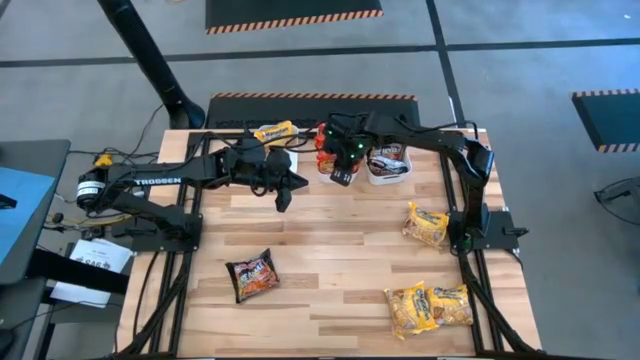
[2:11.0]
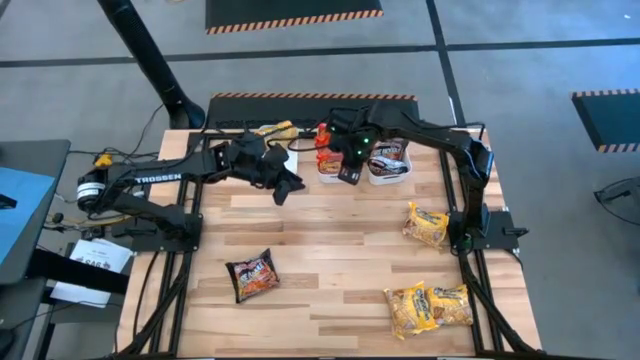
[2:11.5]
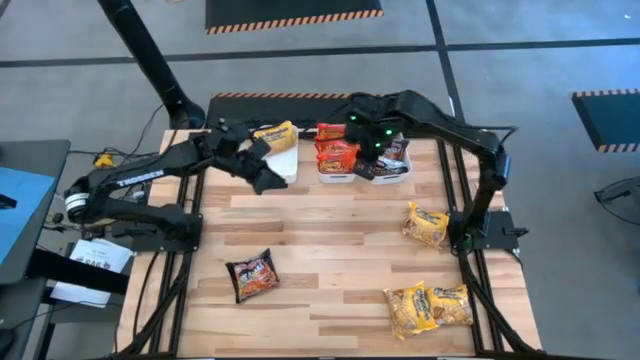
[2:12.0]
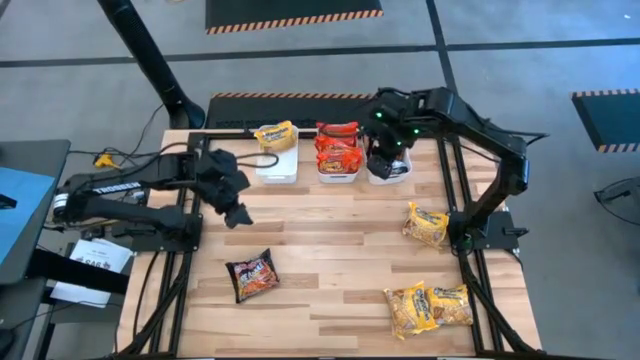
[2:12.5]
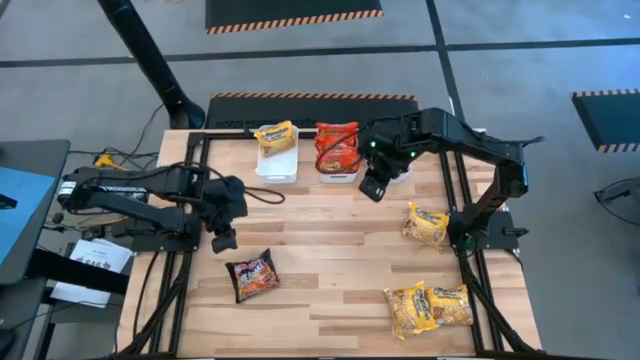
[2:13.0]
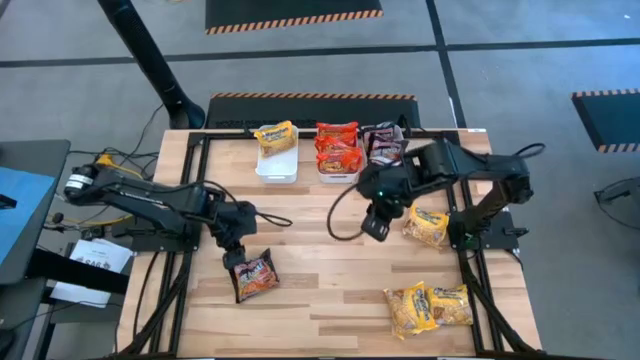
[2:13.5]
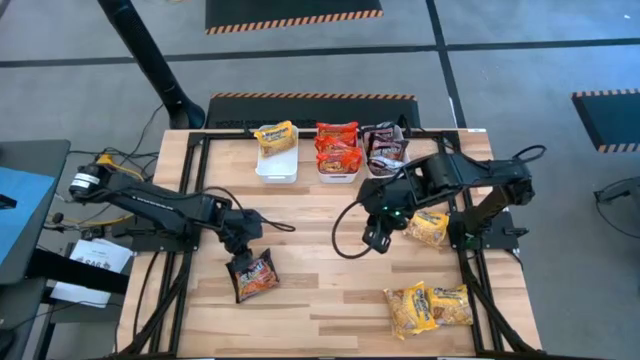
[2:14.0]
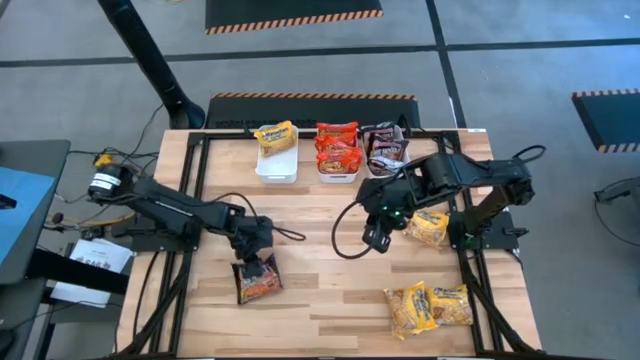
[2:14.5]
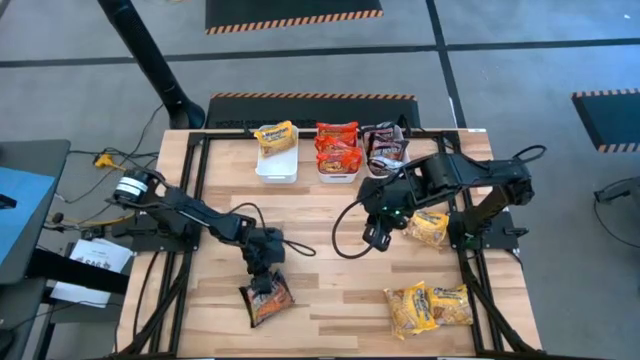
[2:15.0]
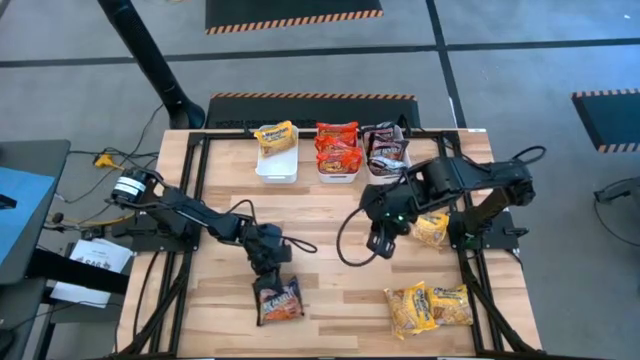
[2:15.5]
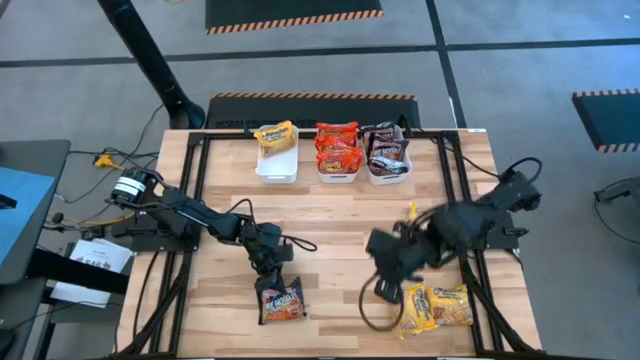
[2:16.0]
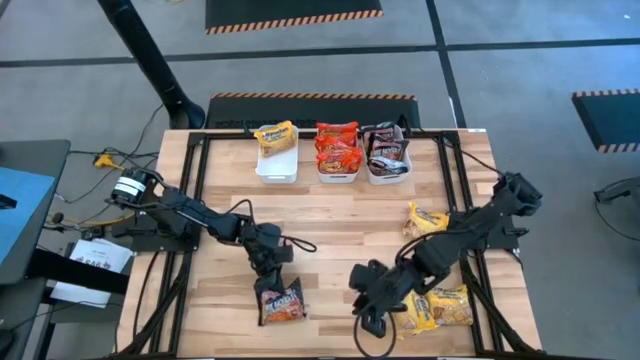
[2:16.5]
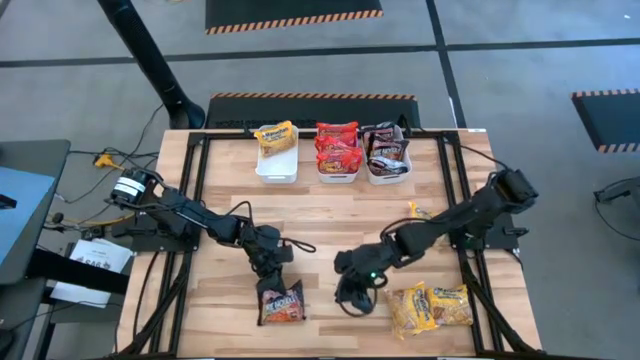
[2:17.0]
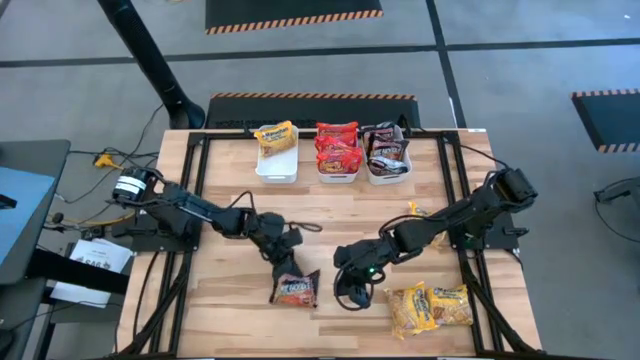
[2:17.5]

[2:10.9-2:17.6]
Task: Sort Maruchan noodles
Put the black noodle pack into the right white bin

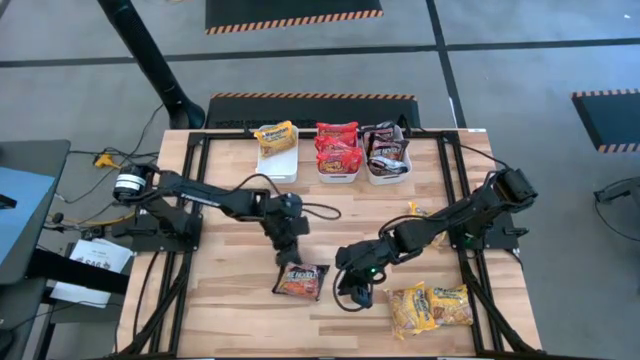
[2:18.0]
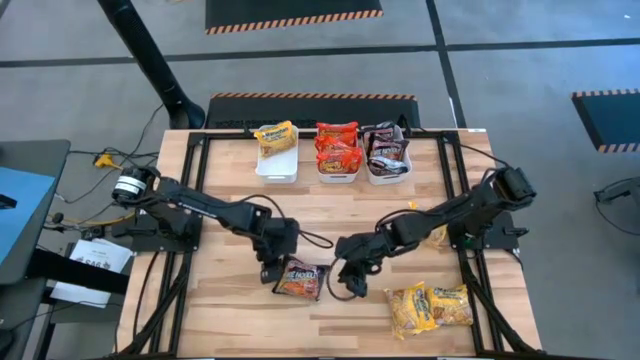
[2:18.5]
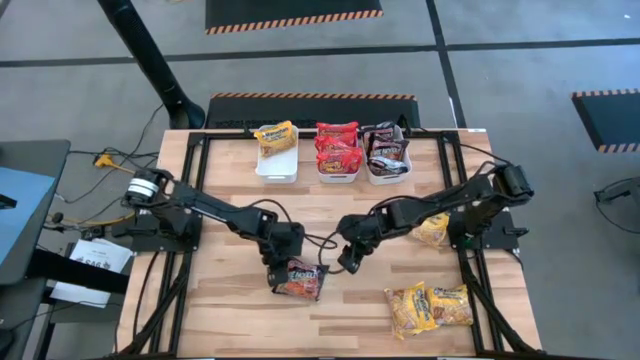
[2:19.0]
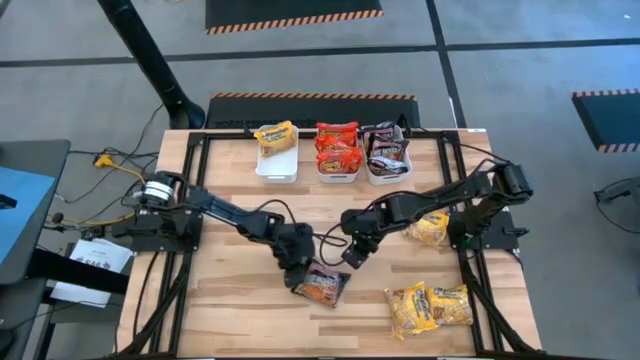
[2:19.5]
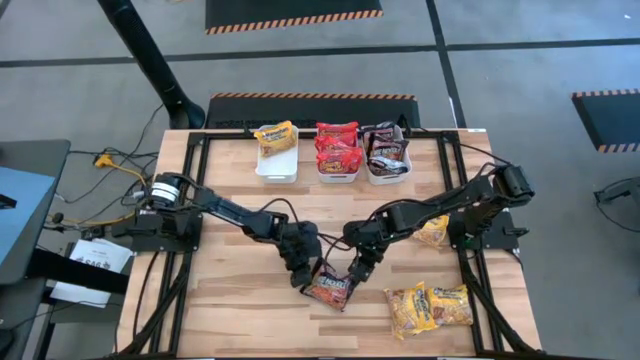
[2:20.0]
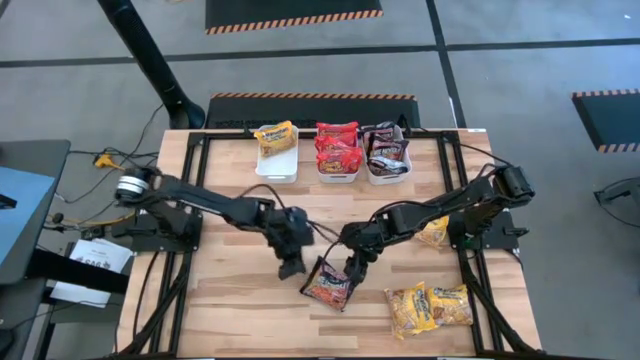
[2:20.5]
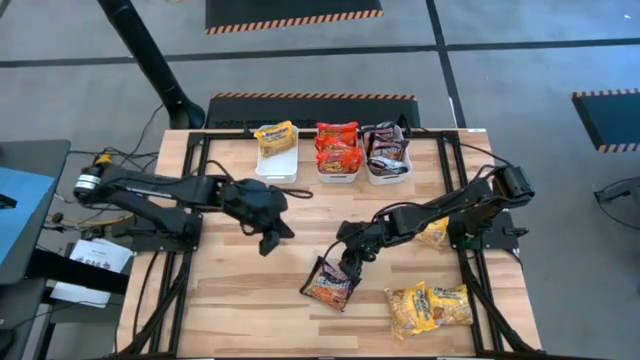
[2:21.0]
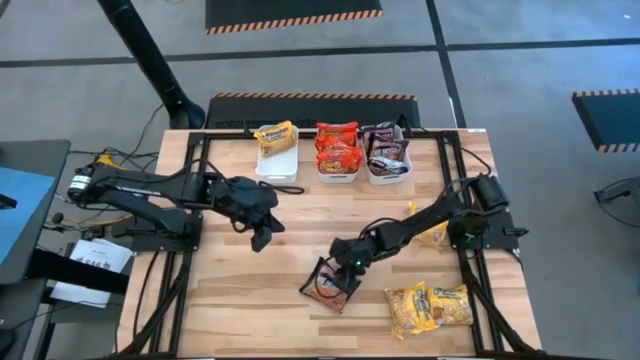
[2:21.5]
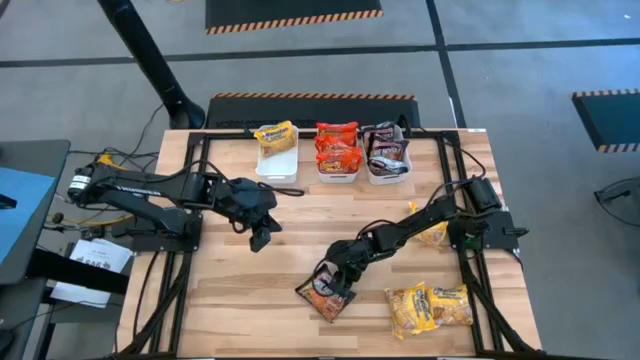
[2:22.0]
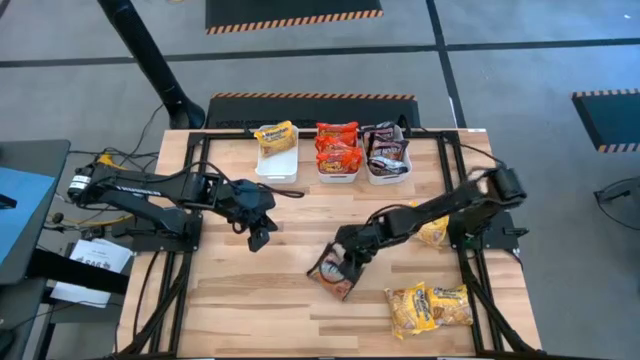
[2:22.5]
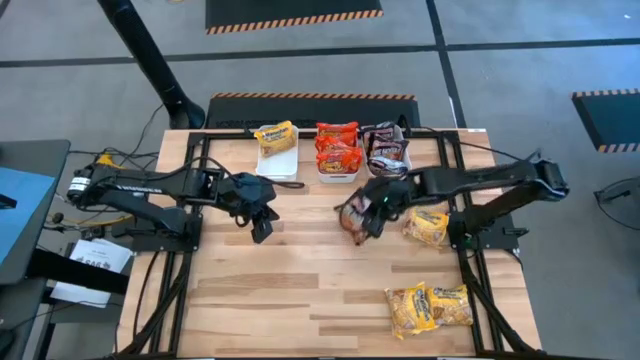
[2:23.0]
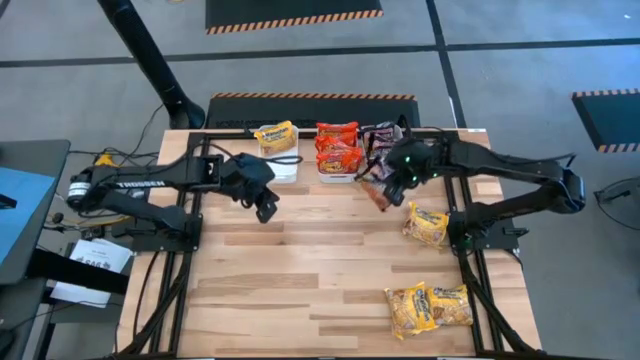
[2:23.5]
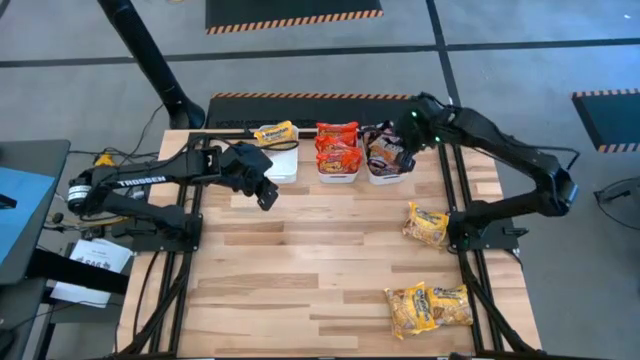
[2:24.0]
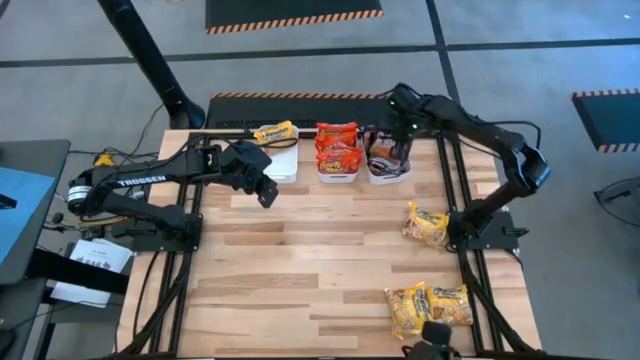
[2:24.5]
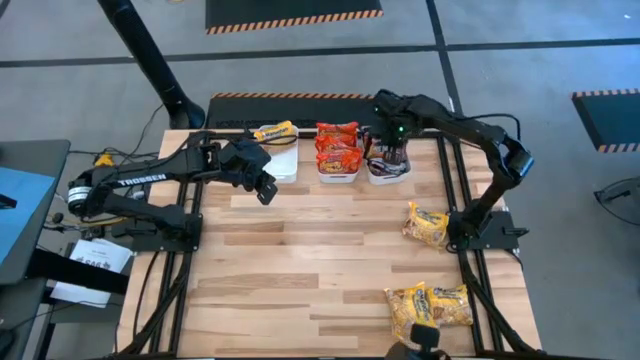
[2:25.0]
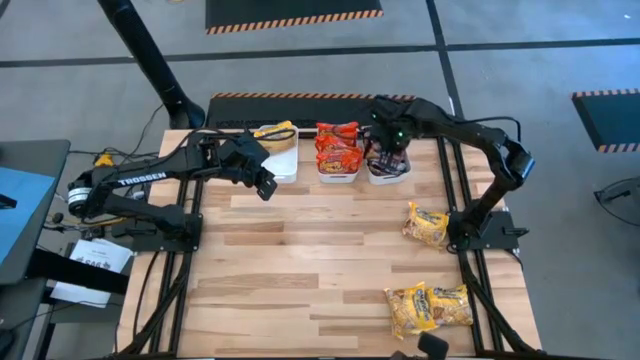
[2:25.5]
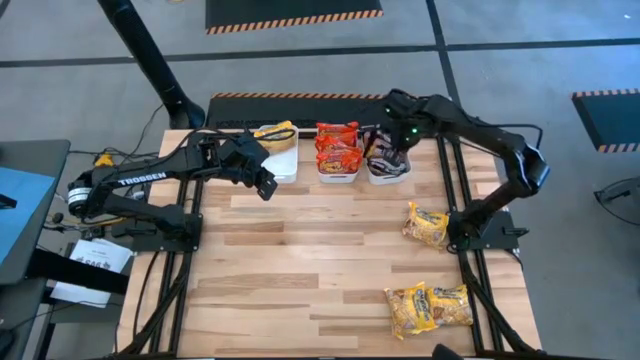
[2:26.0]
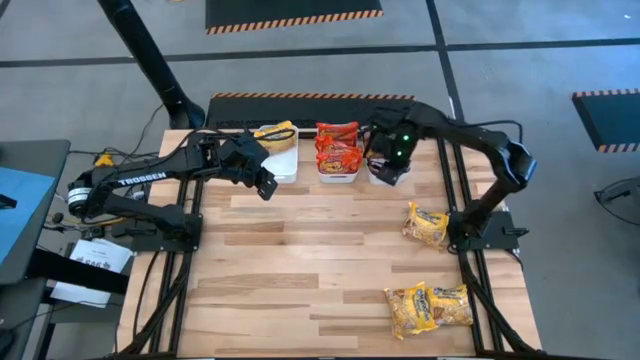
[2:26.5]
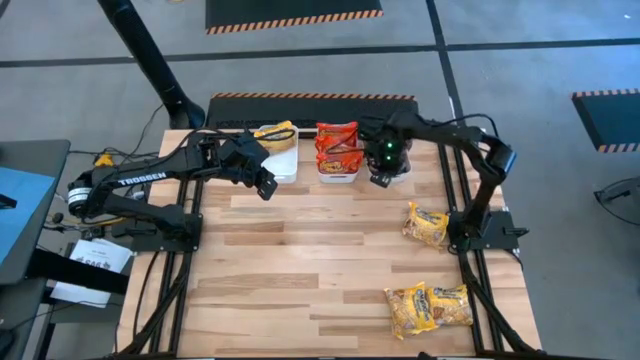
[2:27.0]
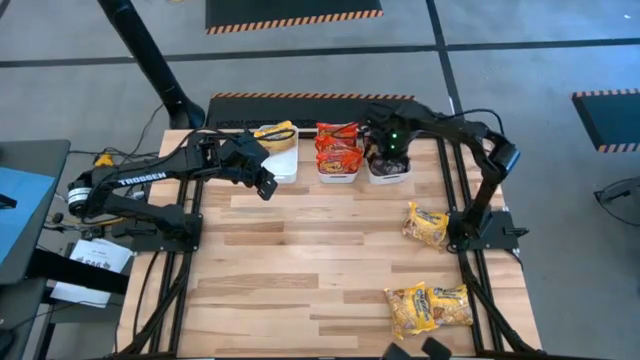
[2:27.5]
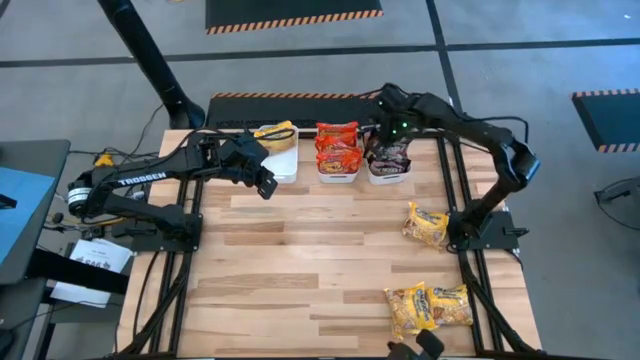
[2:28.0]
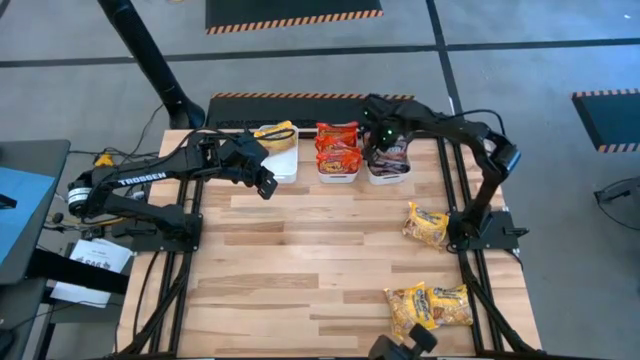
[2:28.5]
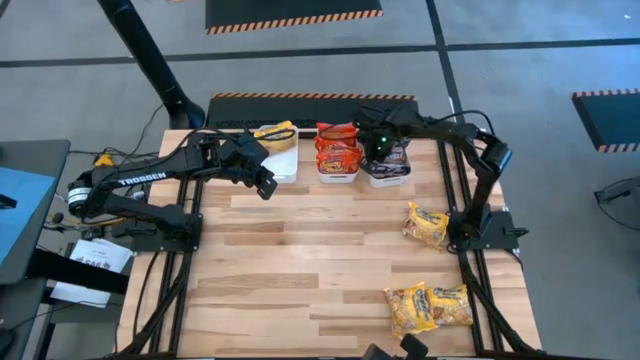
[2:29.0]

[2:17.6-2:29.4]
Put the black noodle pack into the right white bin

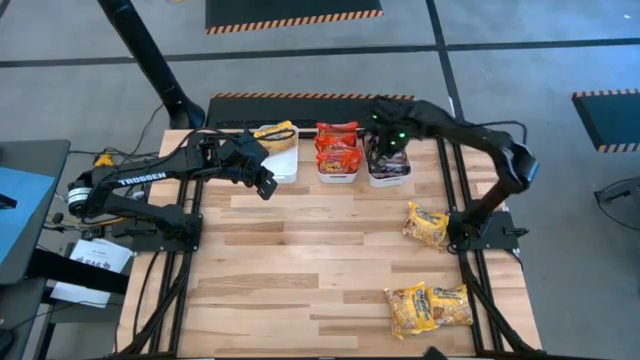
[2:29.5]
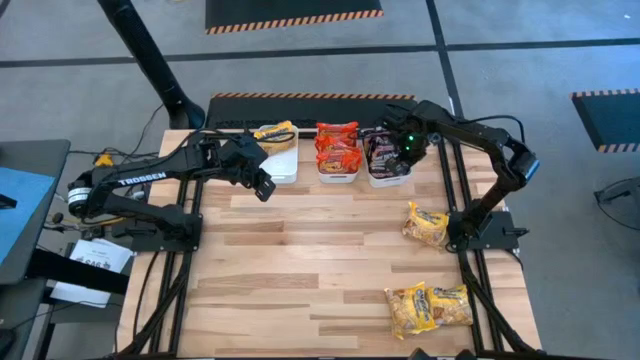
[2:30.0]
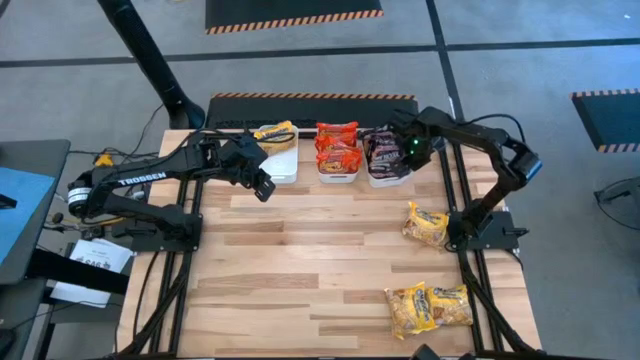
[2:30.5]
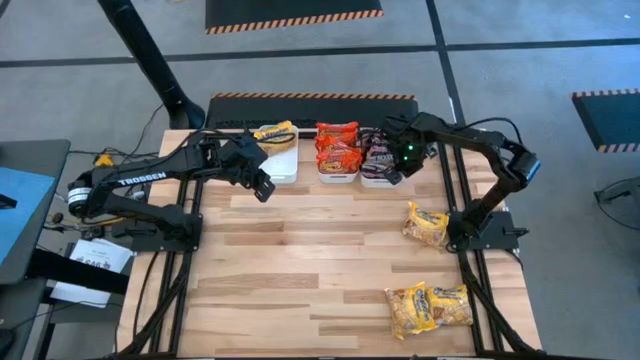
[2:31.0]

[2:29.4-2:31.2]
Adjust the right white bin
